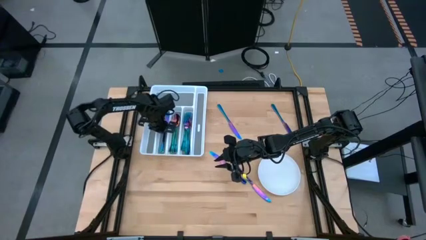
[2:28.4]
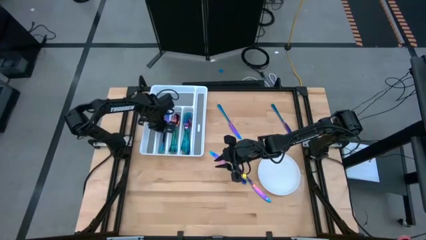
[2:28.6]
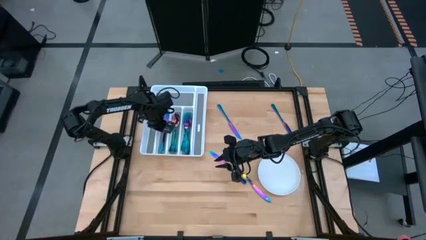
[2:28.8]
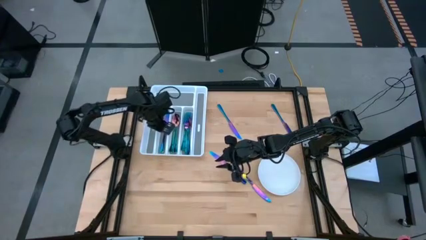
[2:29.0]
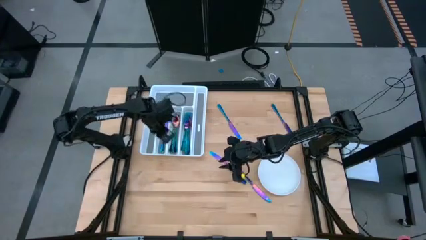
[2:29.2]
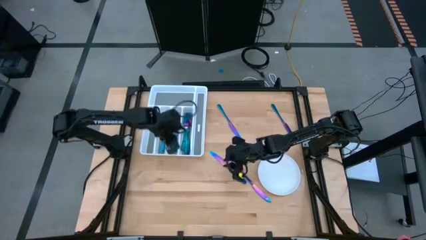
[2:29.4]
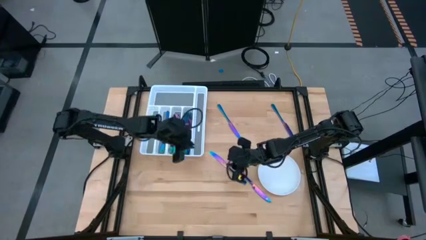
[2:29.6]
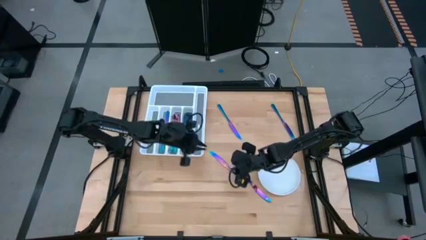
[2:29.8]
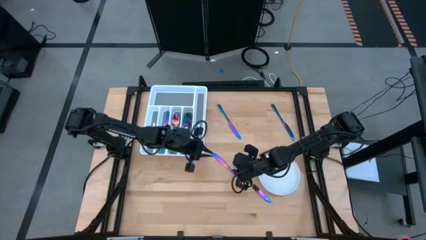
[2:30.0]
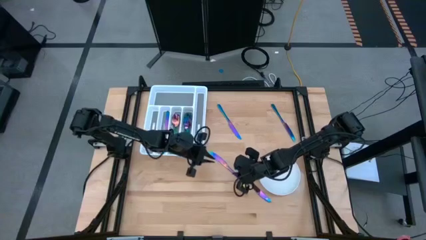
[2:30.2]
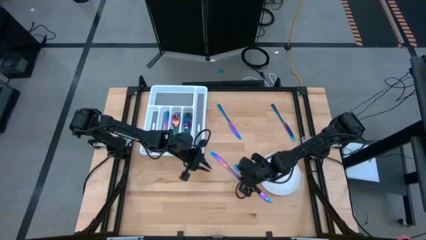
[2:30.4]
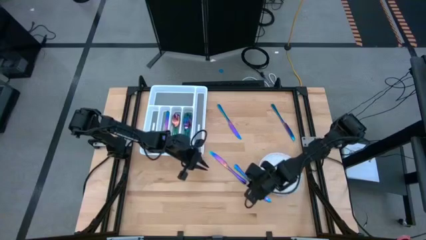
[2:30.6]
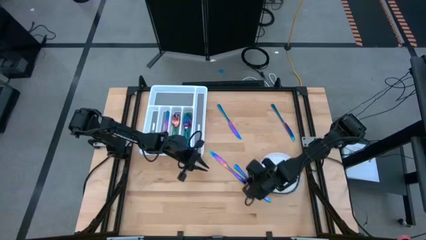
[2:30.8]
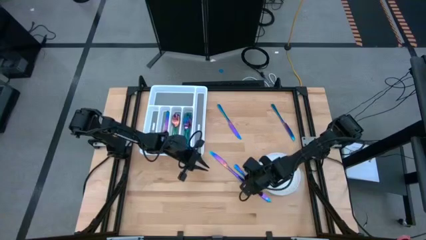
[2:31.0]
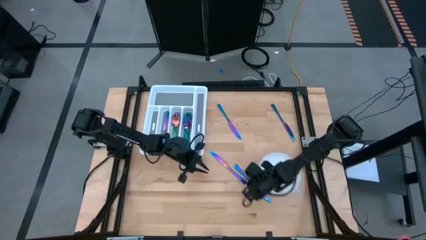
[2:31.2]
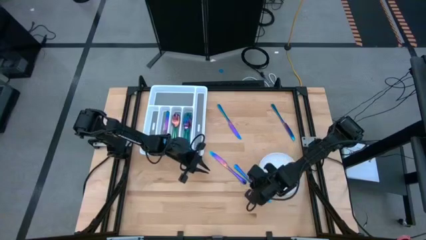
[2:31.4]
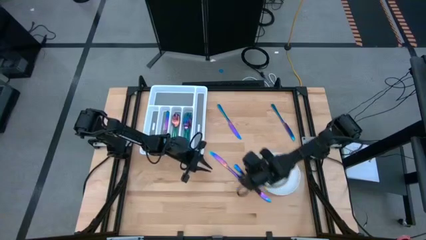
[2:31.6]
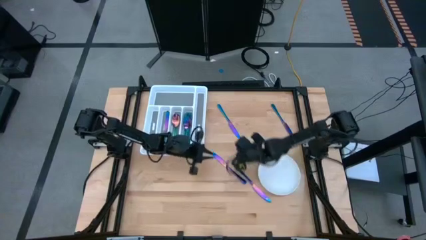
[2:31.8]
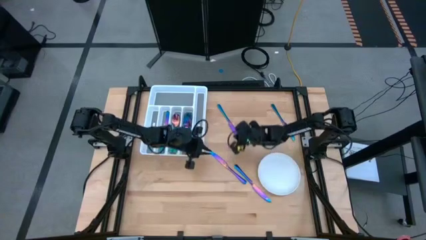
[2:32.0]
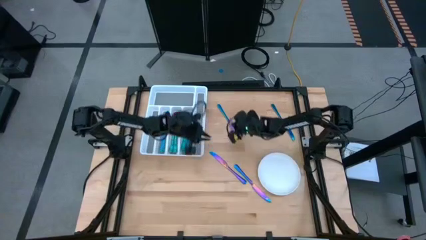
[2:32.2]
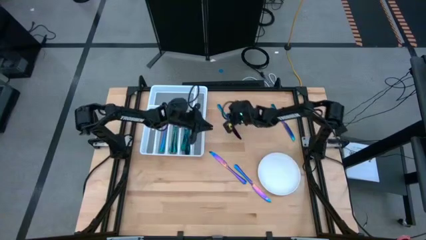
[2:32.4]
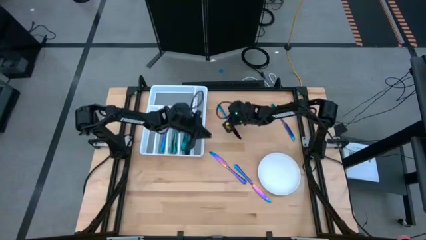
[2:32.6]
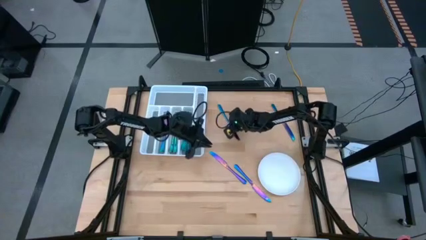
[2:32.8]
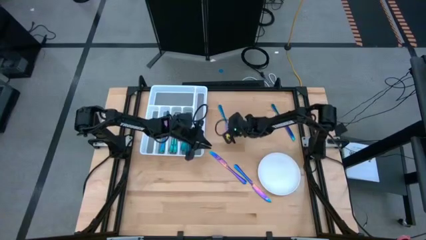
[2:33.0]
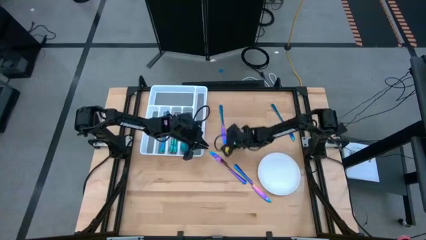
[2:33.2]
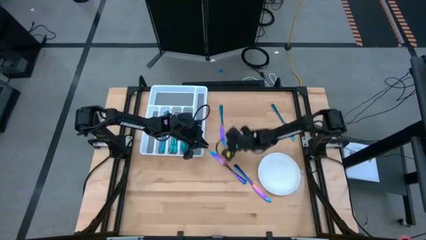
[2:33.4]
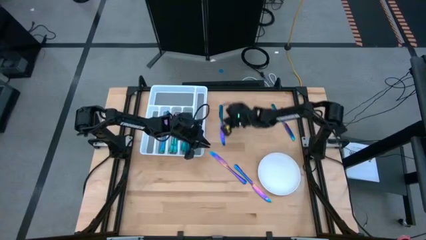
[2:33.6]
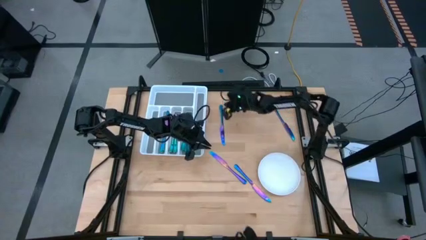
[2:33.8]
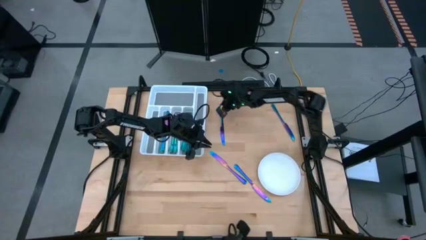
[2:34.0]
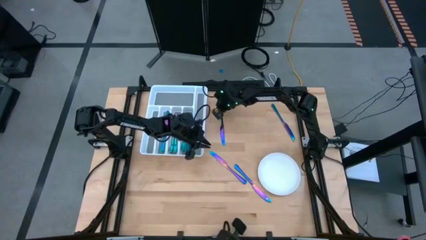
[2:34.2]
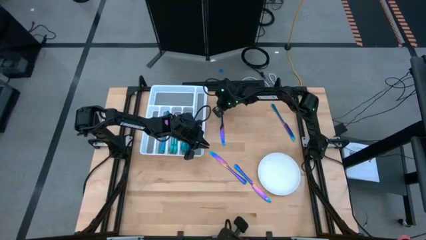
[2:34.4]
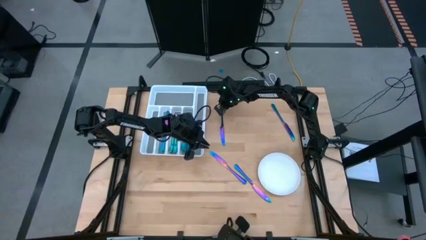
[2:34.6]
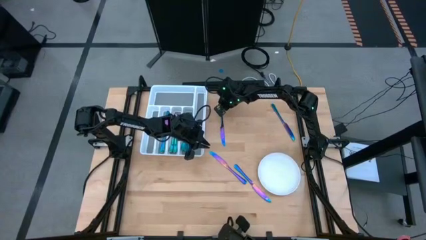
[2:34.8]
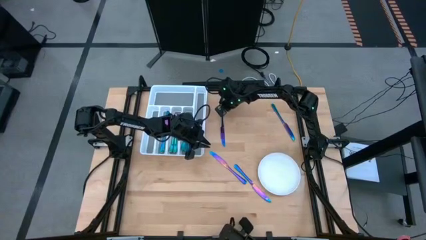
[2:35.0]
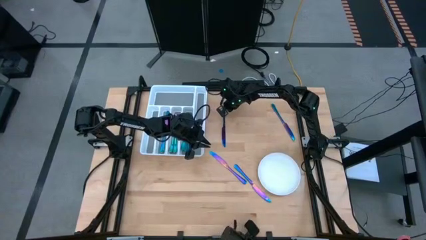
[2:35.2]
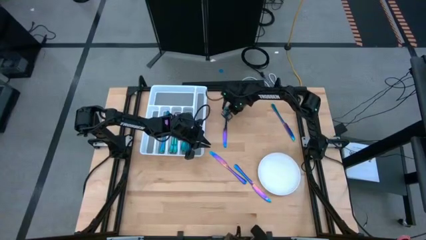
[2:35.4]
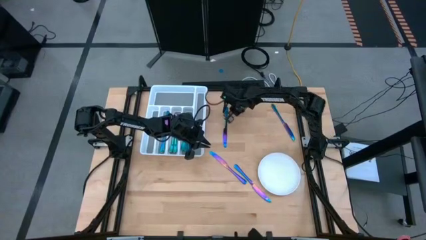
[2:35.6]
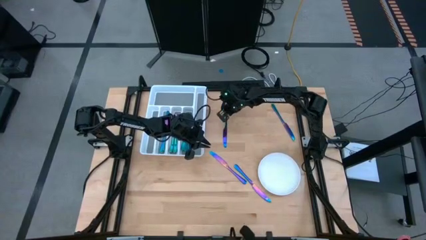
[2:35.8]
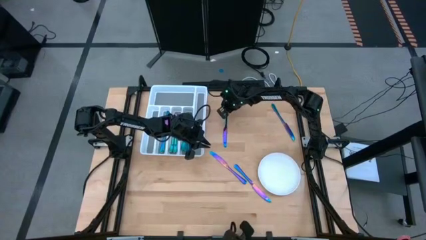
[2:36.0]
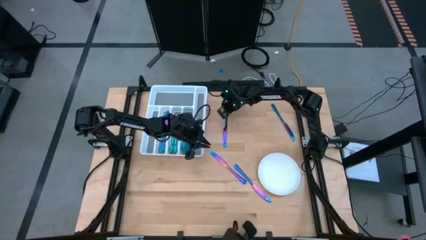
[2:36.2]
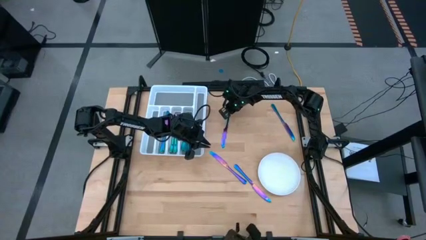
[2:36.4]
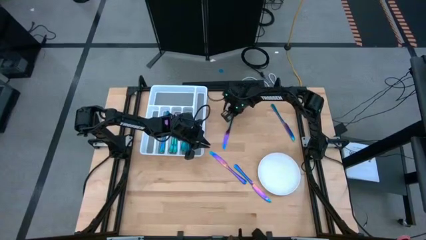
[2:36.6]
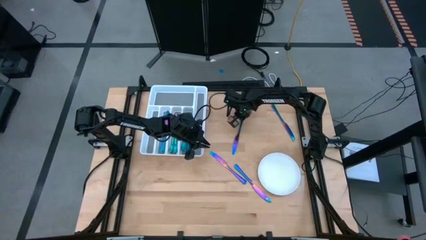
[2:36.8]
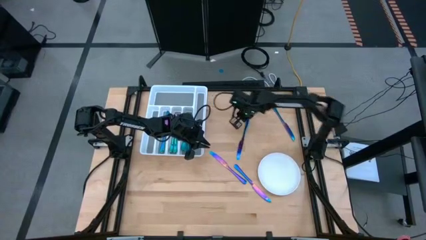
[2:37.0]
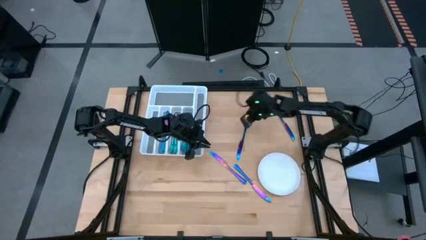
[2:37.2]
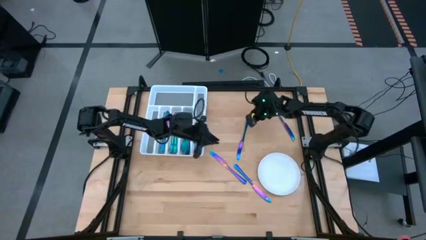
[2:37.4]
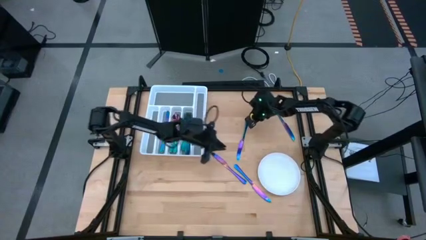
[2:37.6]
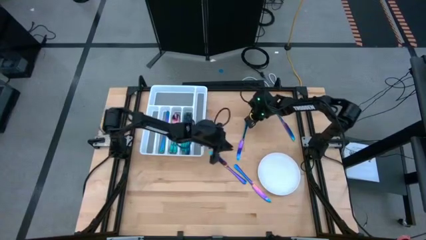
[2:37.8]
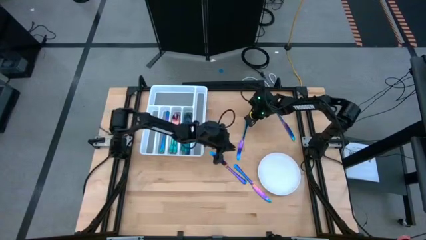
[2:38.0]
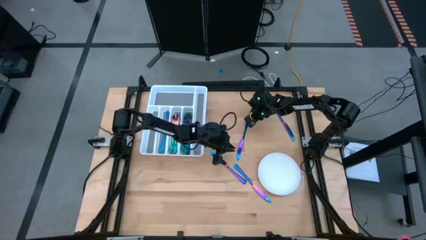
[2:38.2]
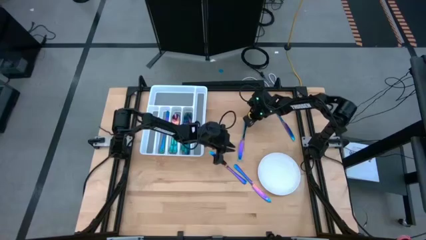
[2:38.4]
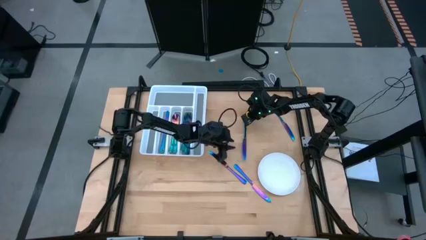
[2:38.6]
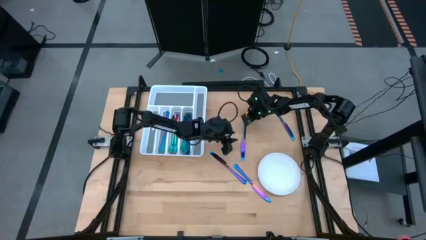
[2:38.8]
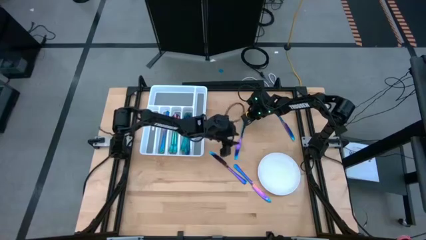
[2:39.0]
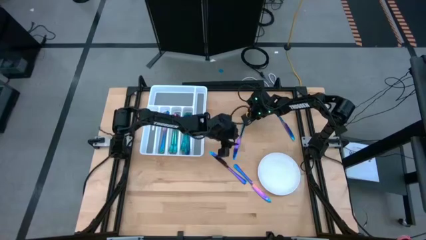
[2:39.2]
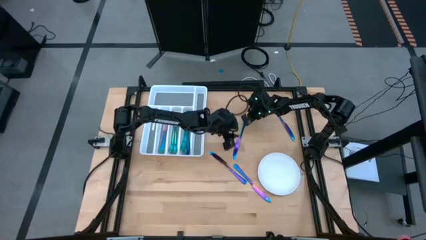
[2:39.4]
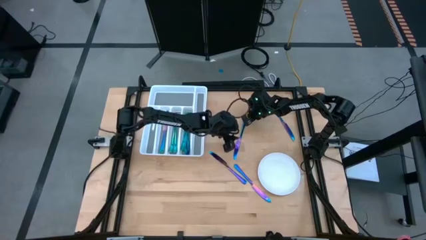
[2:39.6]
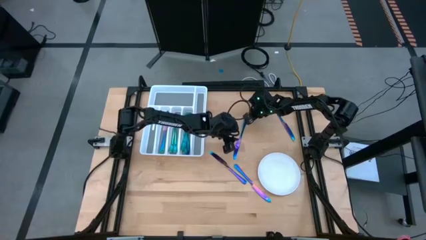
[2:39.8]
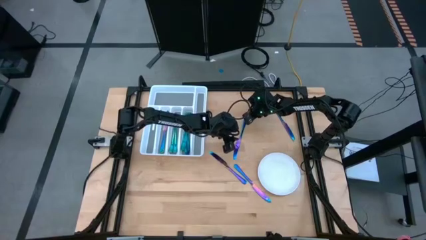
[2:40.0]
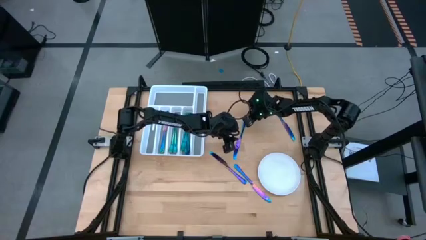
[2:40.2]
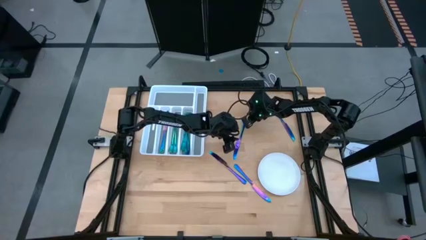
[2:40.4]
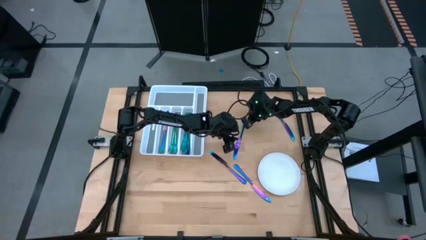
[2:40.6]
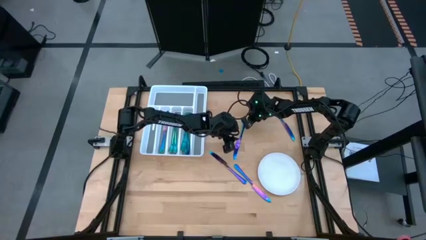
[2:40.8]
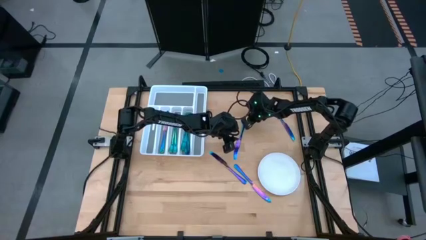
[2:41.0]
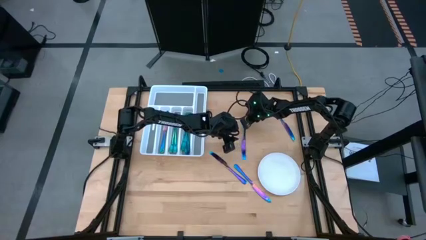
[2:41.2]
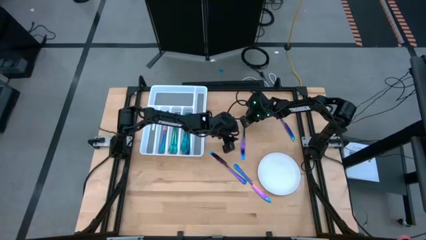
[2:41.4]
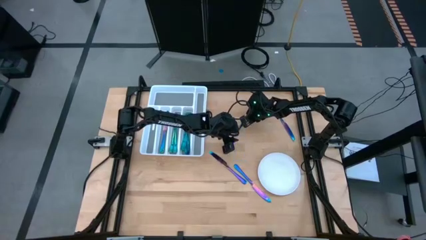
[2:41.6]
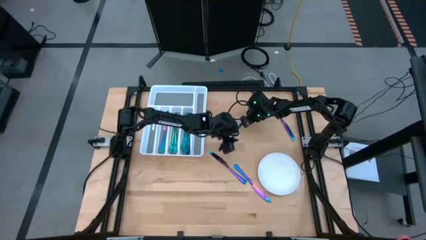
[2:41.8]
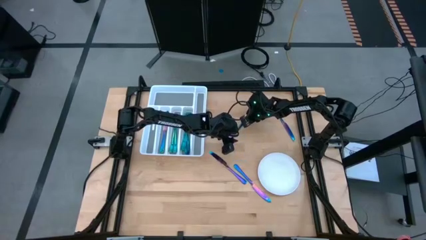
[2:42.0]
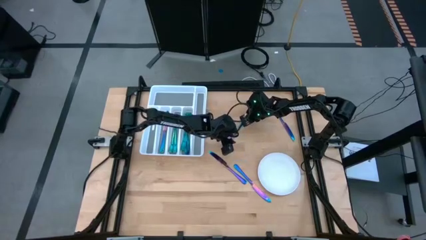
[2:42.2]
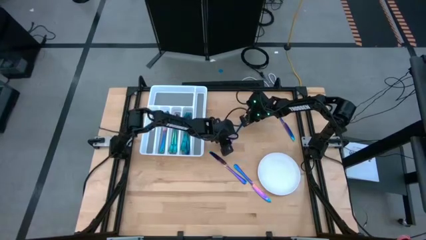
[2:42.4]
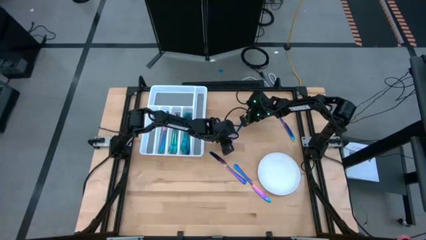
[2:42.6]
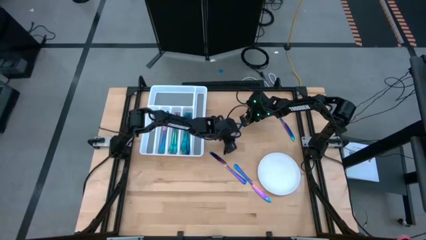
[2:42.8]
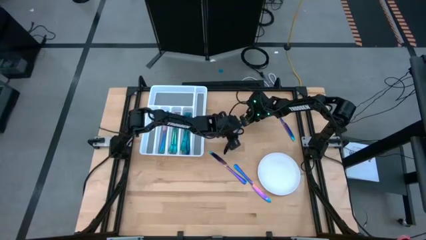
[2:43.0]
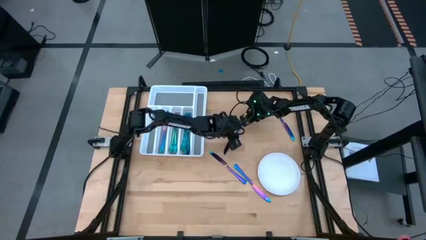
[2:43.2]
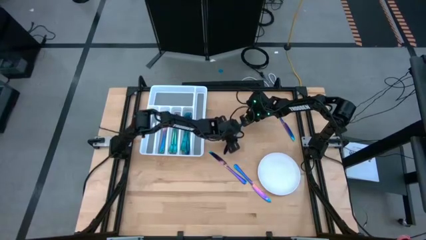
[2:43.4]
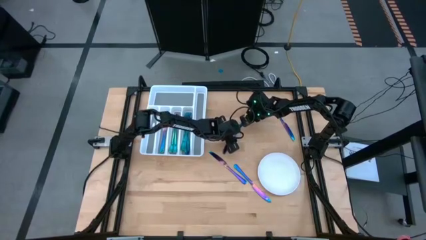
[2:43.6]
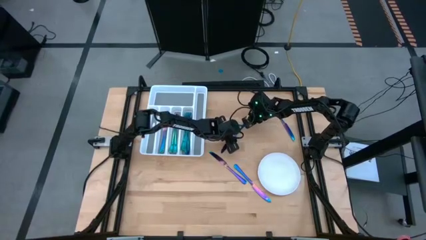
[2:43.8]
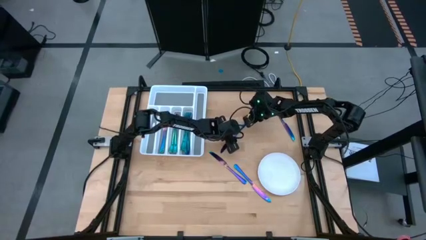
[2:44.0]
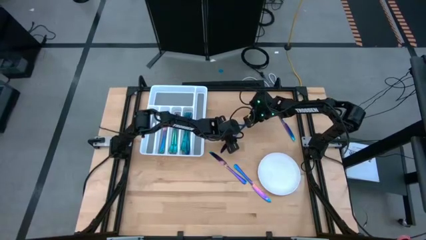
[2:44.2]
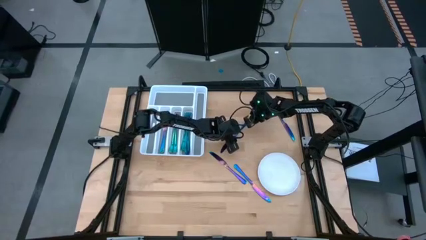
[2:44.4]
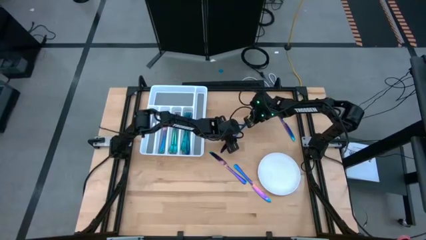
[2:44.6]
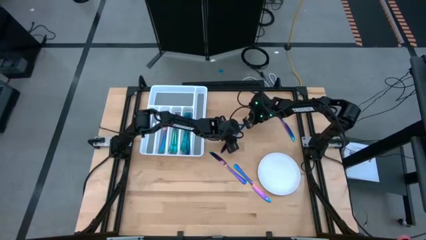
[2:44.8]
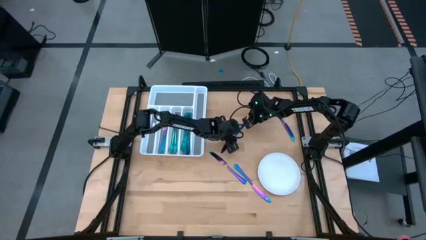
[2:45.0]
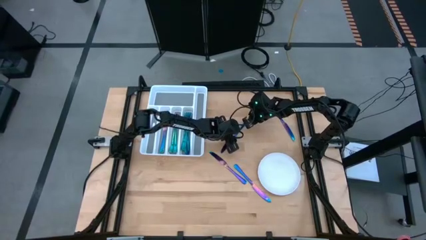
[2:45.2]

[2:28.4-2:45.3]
Task: Sort silverware
Put the iridescent knife into the white silverware tray
